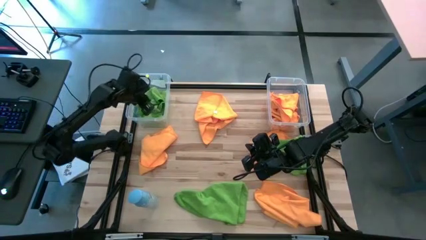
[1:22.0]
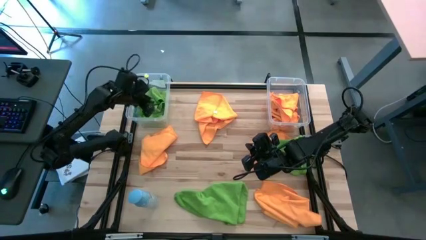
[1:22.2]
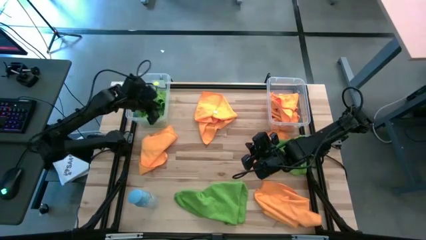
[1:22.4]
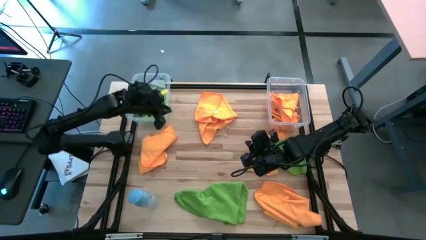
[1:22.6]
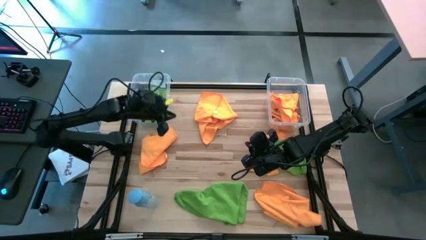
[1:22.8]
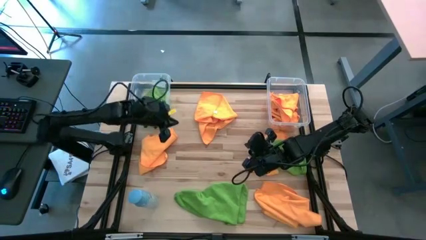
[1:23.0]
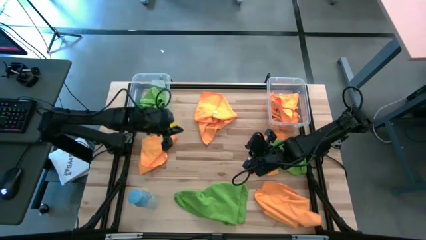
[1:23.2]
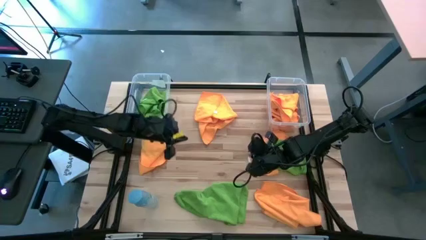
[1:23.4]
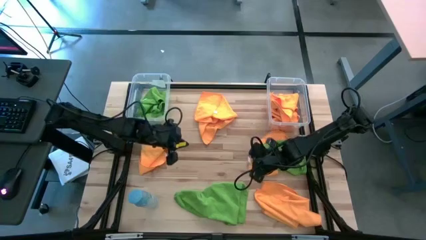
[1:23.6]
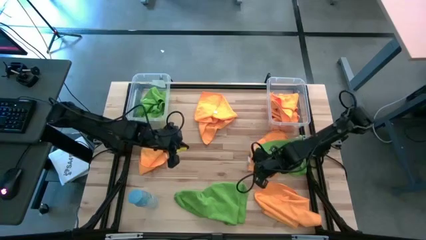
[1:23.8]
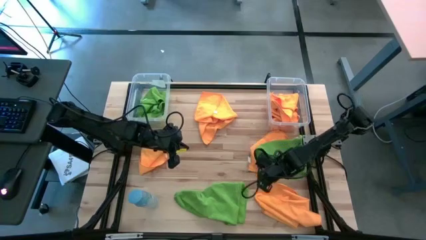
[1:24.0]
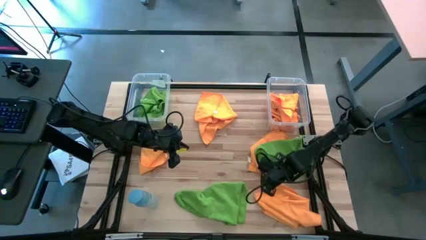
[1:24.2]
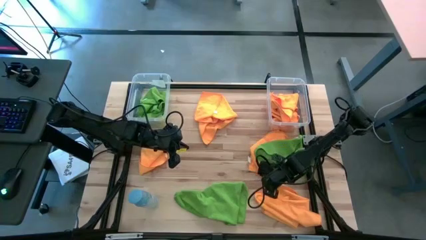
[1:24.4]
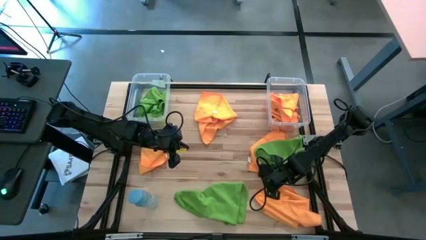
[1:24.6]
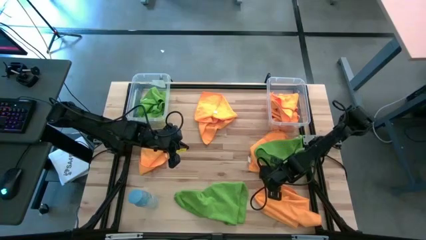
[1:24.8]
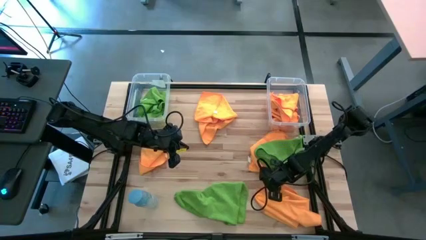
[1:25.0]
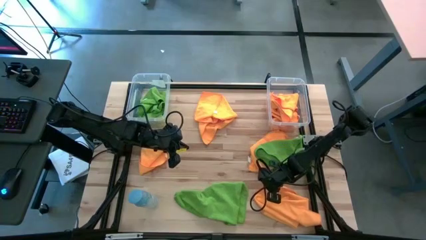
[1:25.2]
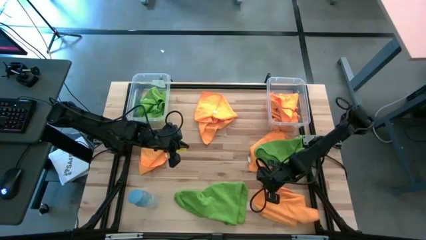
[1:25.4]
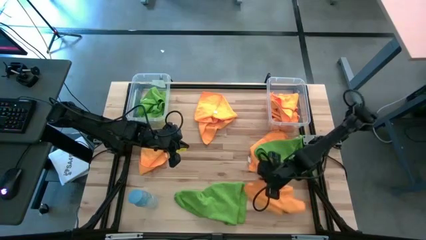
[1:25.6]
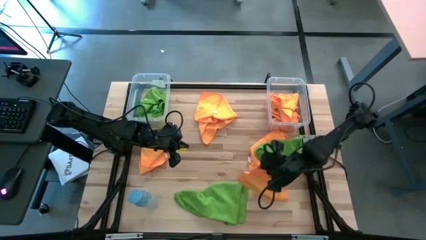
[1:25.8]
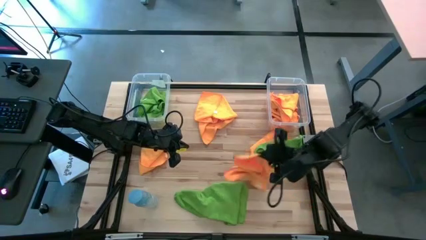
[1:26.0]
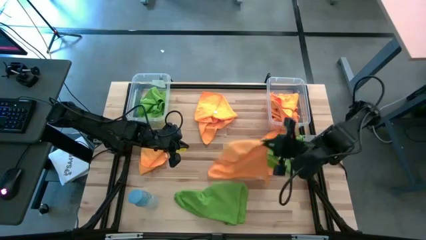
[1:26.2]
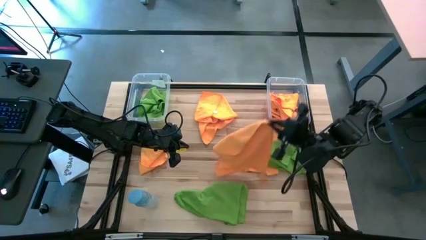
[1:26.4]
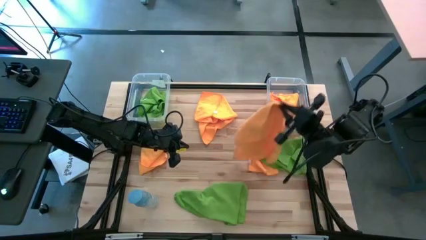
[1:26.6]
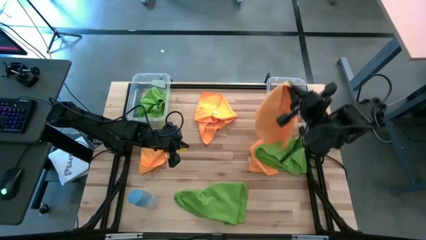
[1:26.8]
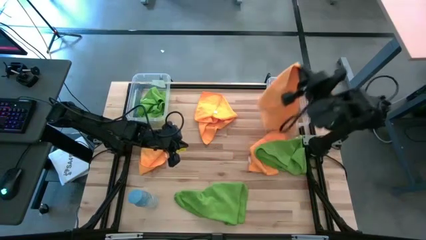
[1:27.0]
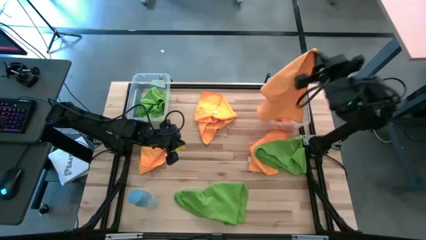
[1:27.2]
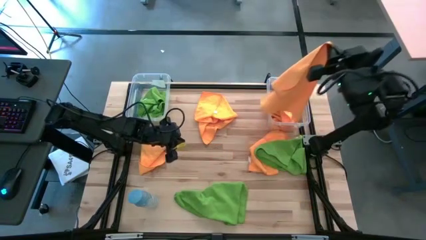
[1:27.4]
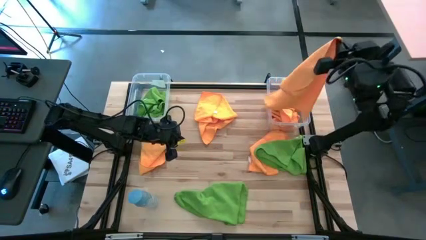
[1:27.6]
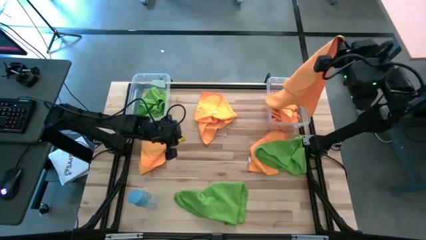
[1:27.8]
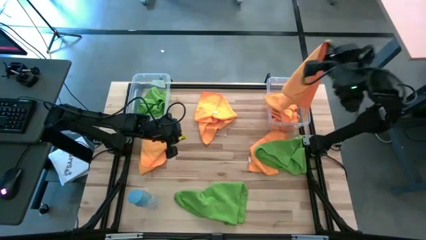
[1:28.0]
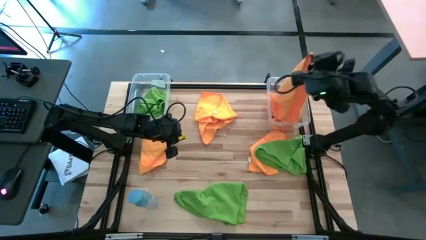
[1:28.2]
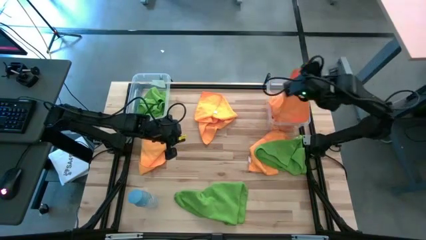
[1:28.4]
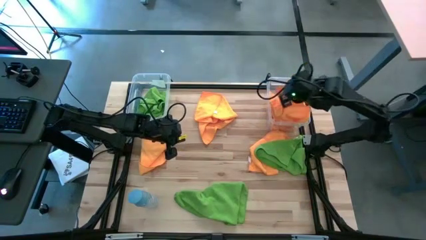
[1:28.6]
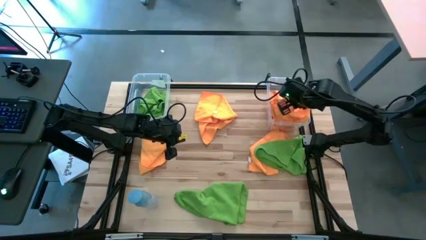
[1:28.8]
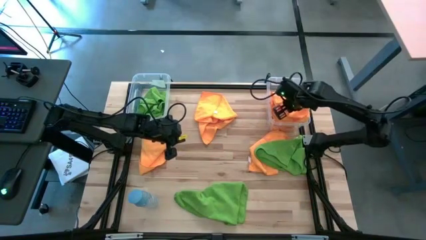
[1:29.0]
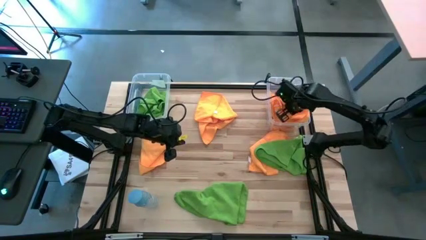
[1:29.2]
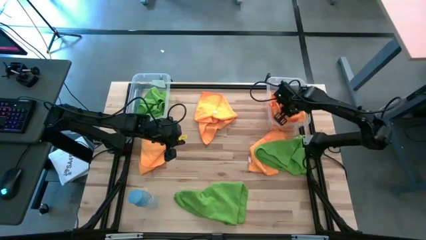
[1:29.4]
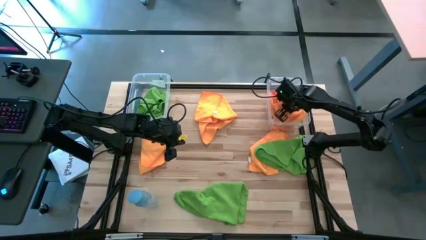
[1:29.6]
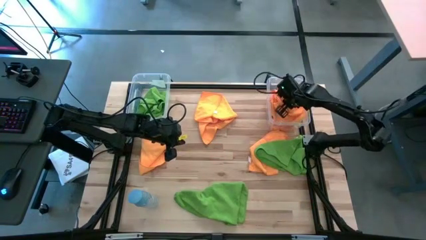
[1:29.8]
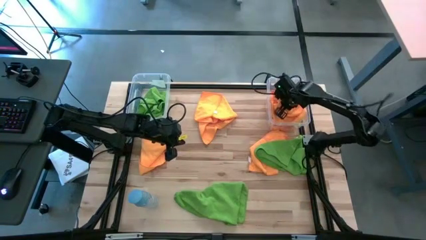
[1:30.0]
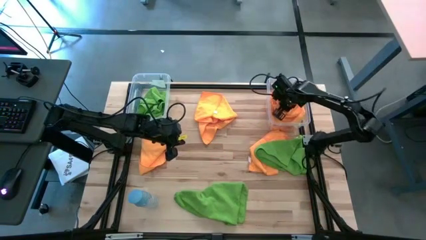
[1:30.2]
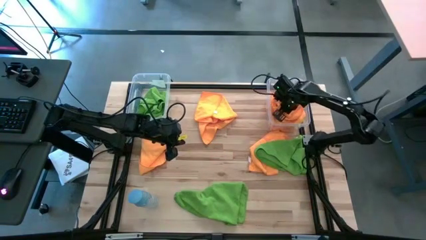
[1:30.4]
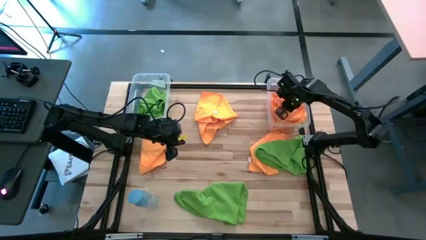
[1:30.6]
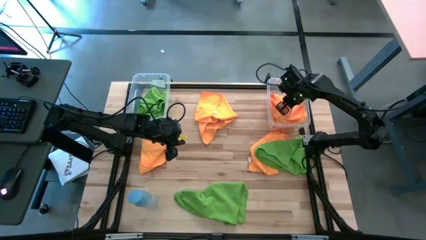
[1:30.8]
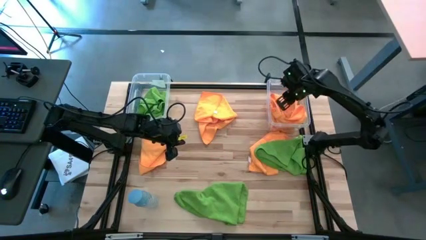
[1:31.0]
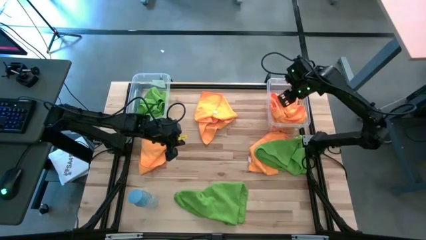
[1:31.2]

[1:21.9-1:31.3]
Task: Sort microfiber towel by color & place in baskets
Put the orange microfiber towel into the right transparent bin

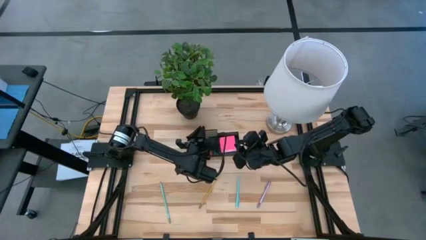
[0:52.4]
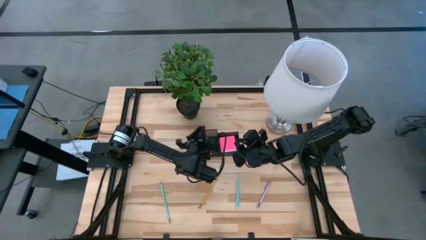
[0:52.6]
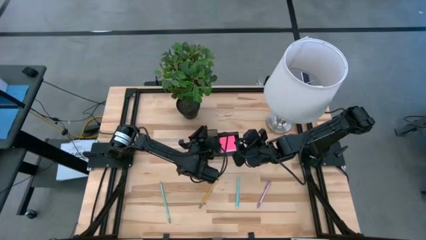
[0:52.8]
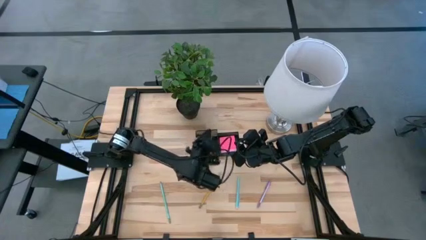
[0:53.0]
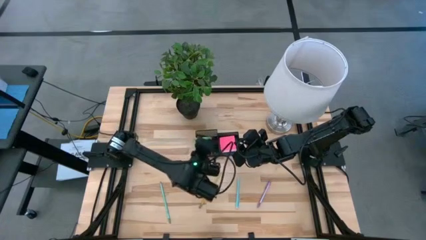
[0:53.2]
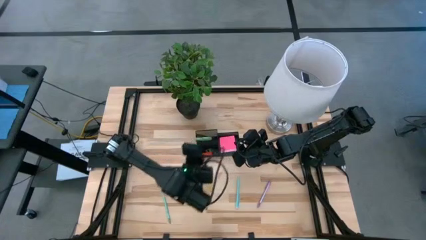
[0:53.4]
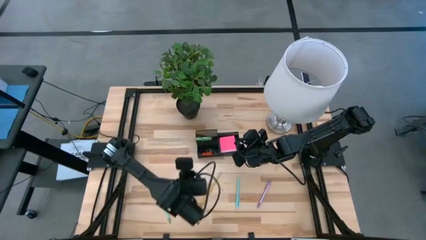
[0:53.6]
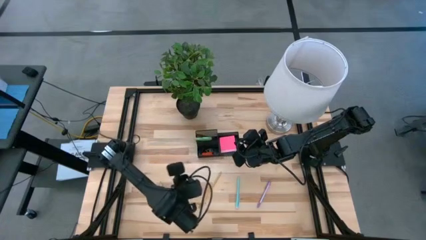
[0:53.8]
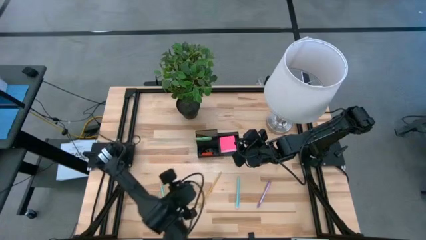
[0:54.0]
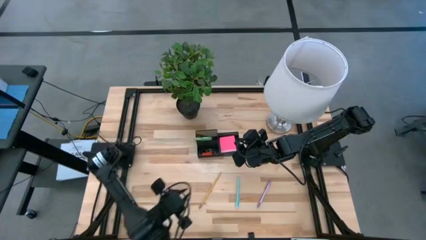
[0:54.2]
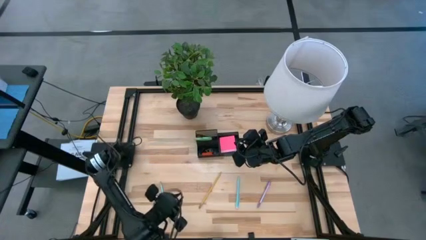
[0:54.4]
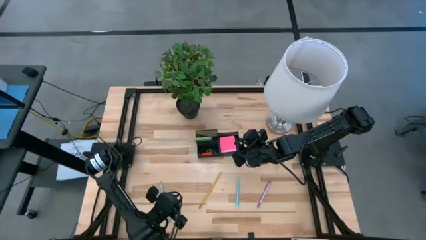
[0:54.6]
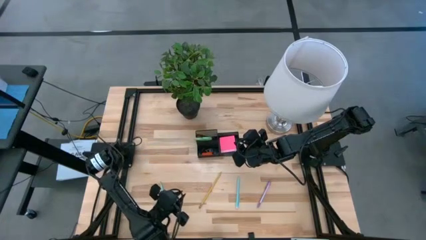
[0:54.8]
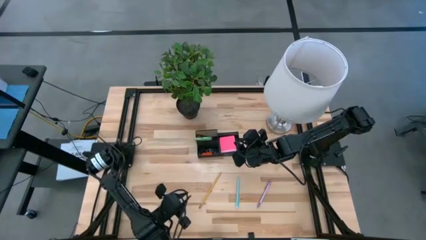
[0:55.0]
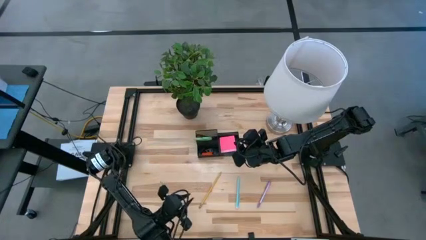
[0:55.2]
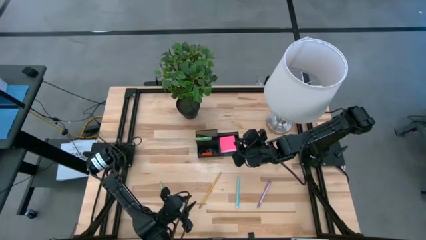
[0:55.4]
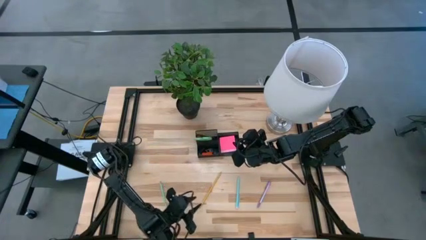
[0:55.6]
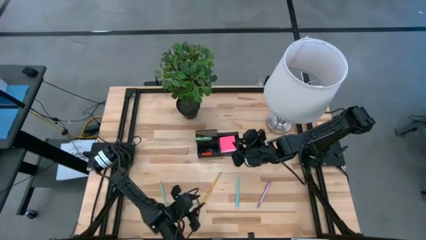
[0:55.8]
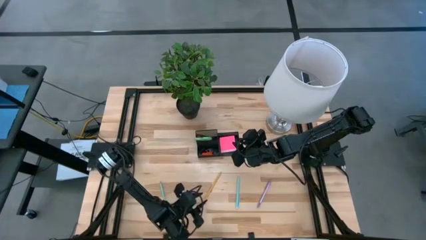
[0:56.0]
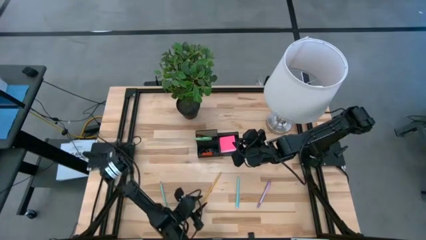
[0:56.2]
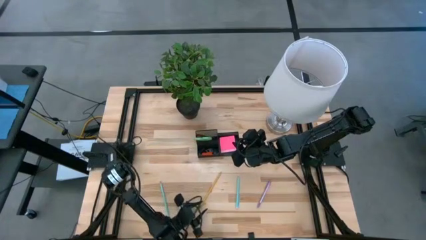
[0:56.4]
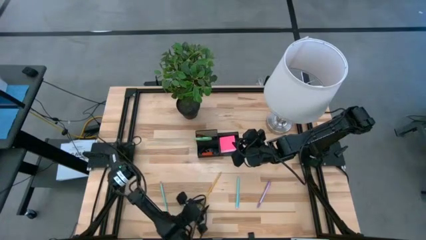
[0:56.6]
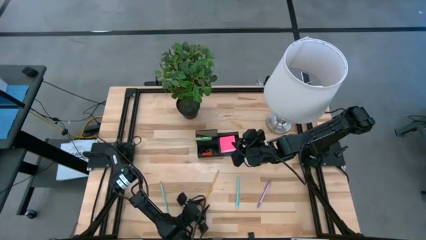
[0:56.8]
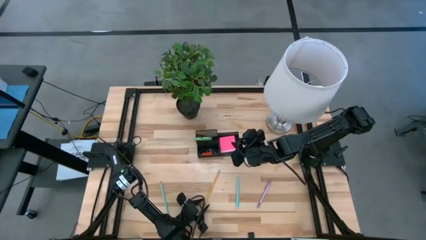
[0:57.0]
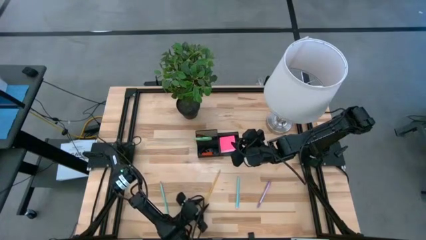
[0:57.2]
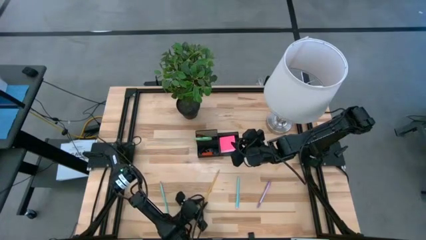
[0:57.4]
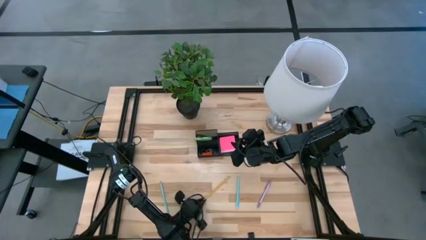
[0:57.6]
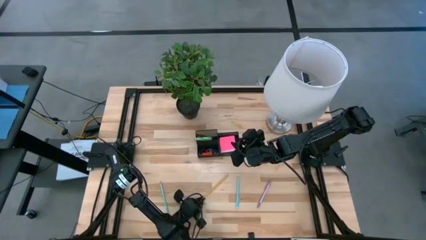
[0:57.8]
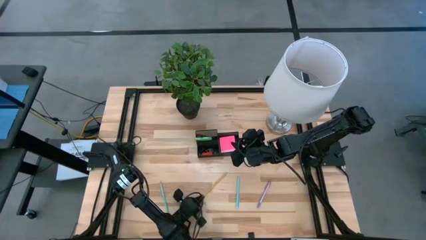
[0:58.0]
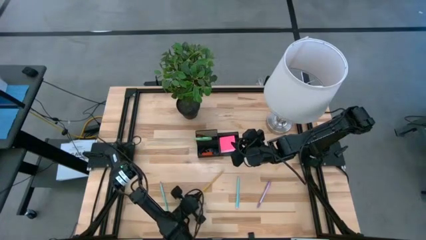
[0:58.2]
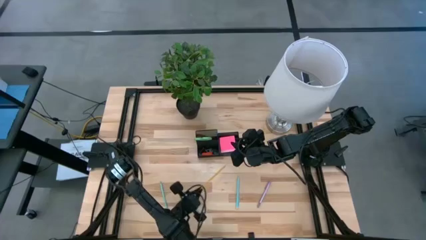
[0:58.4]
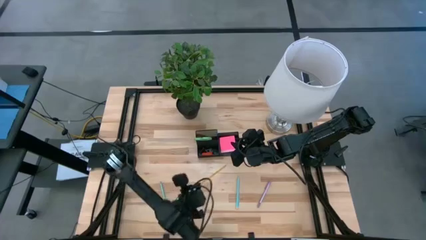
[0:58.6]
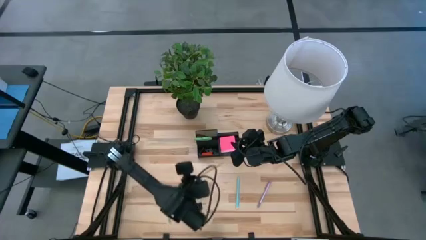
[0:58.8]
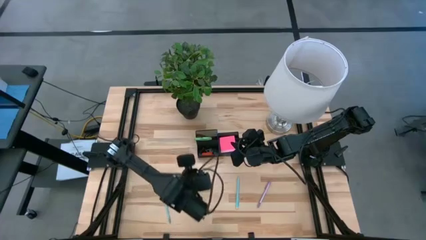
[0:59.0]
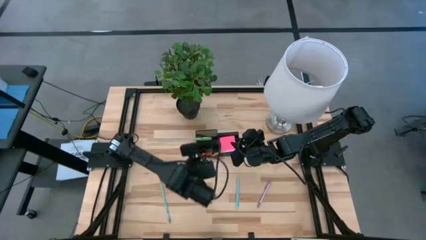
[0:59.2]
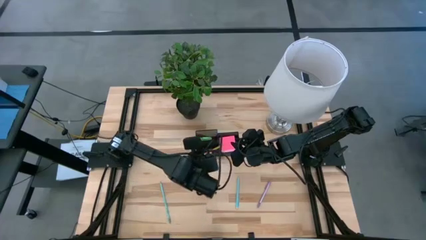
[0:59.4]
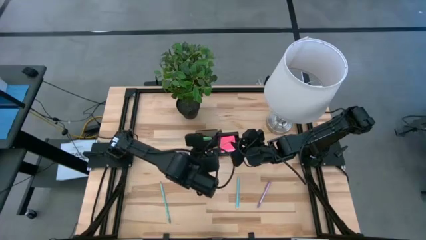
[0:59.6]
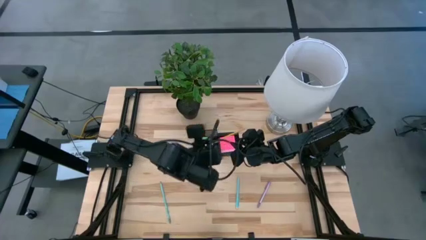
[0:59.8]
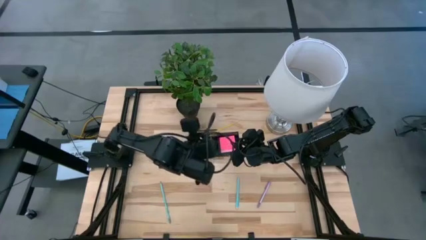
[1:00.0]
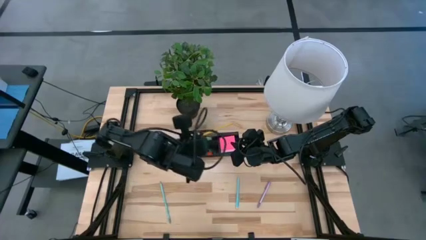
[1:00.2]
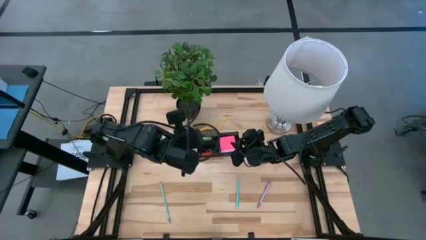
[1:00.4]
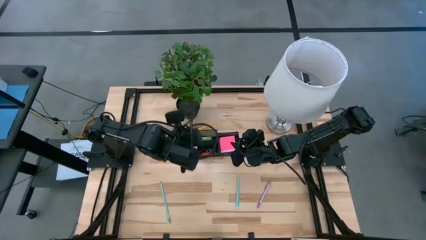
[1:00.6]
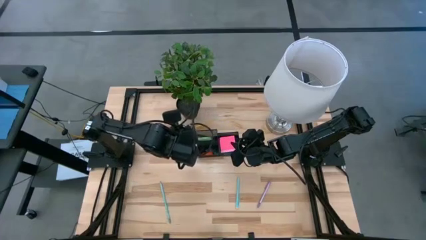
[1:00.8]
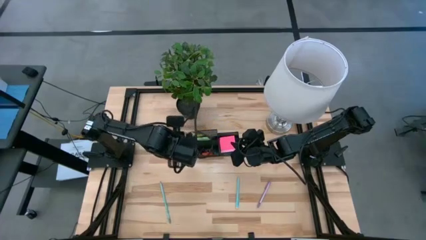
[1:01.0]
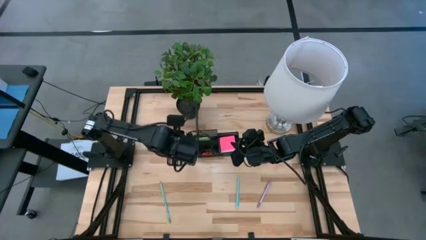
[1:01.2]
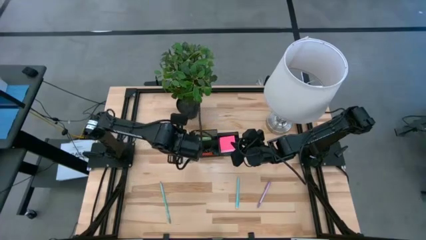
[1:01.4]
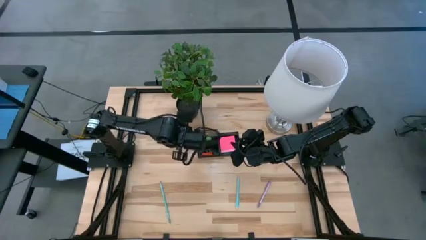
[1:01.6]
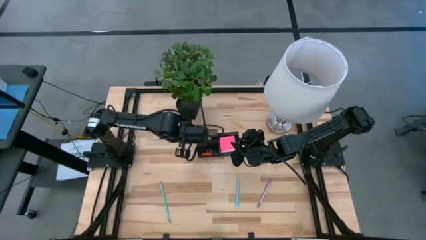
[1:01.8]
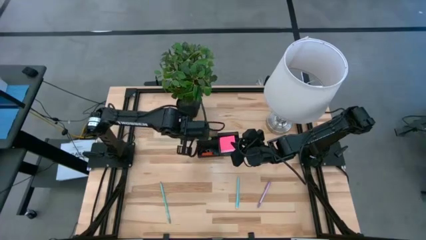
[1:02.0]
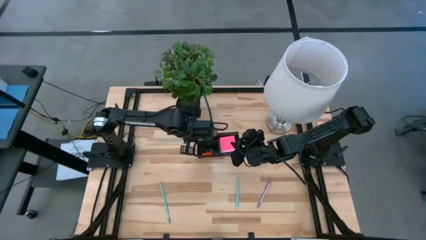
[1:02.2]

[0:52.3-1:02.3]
Task: Pick and place office supplies into organizer
Put the yellow pencil into the black desk organizer
